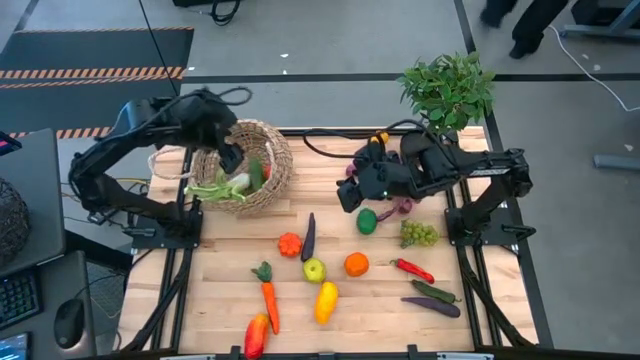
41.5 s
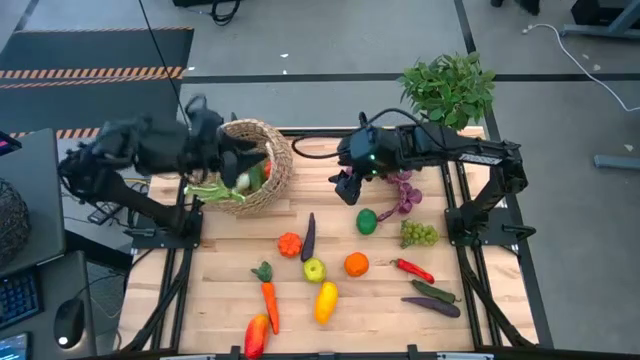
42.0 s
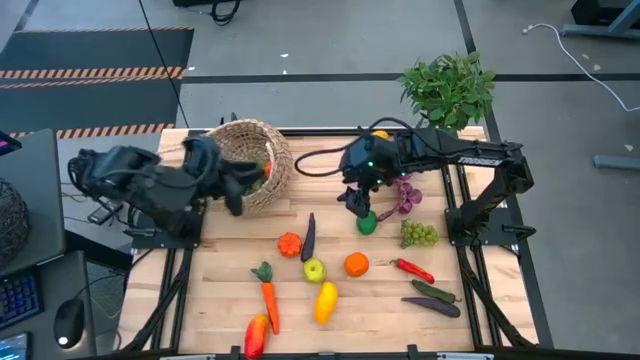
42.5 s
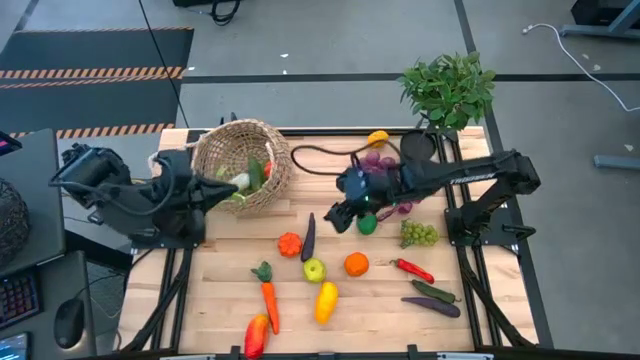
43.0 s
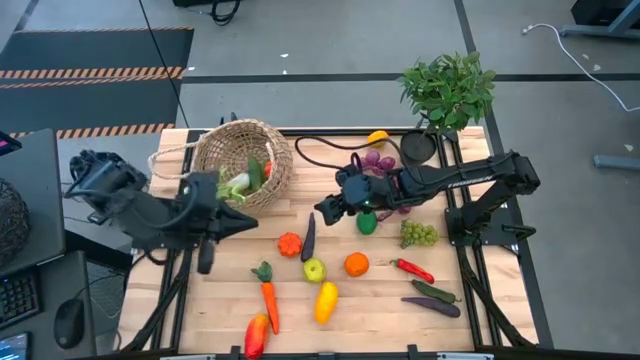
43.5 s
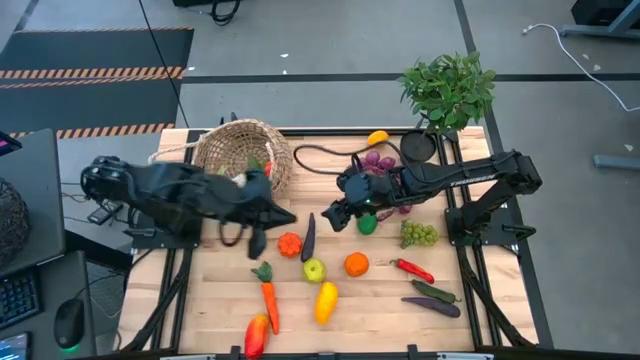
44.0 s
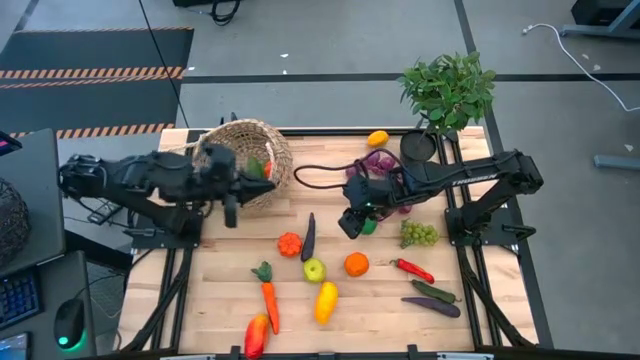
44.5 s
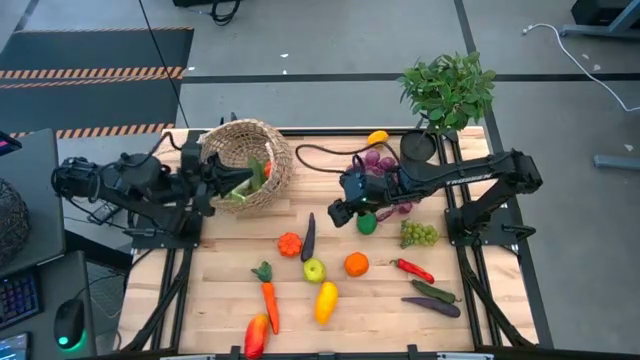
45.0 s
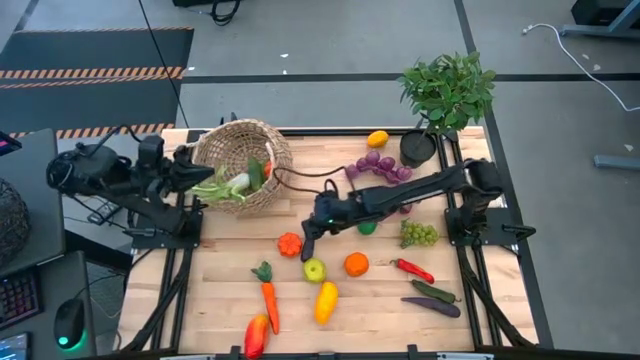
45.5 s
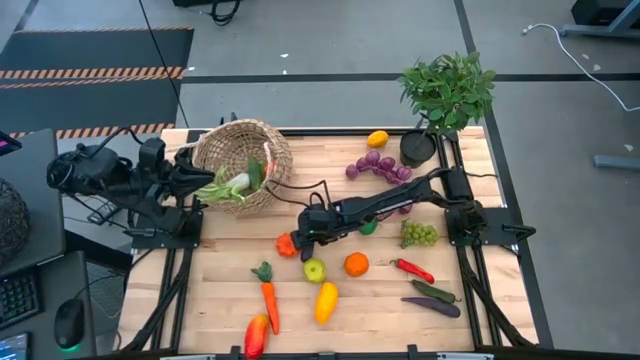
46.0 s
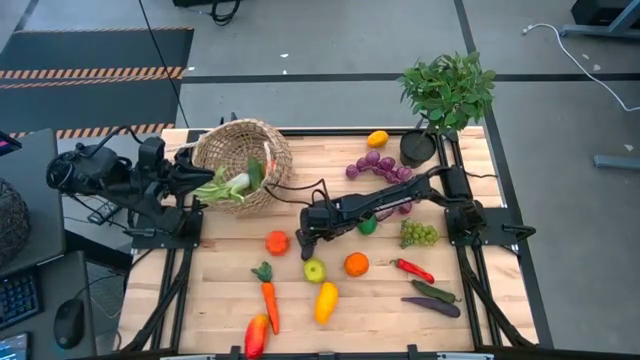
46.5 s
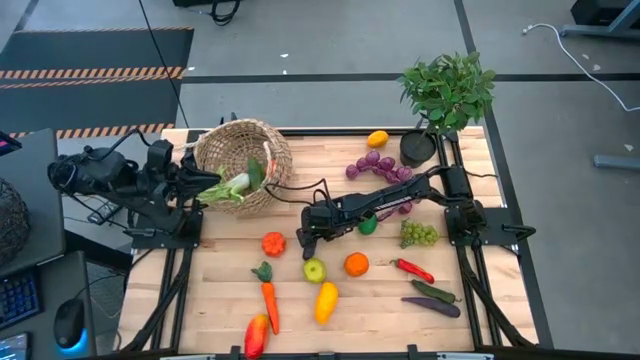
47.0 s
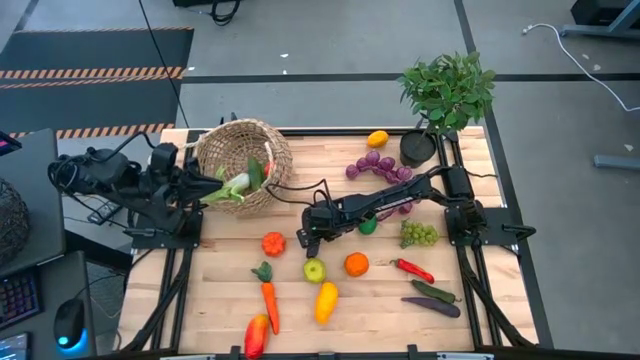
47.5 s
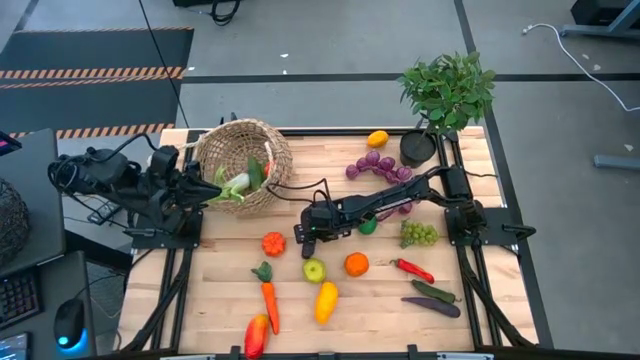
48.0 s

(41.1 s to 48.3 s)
Task: Build produce basket
Put the top violet eggplant into the brown basket

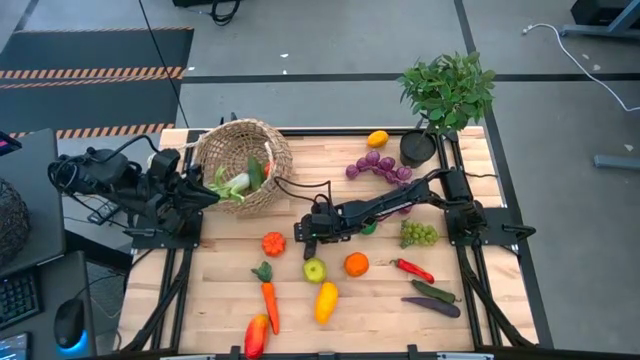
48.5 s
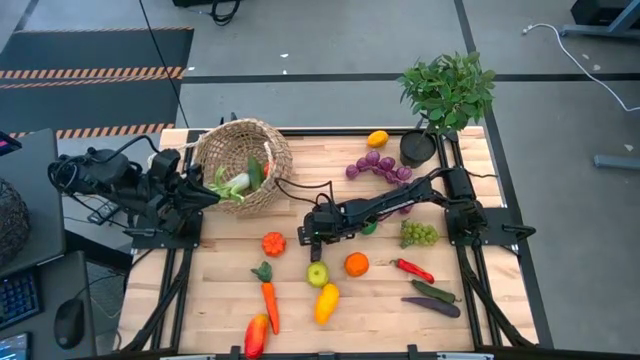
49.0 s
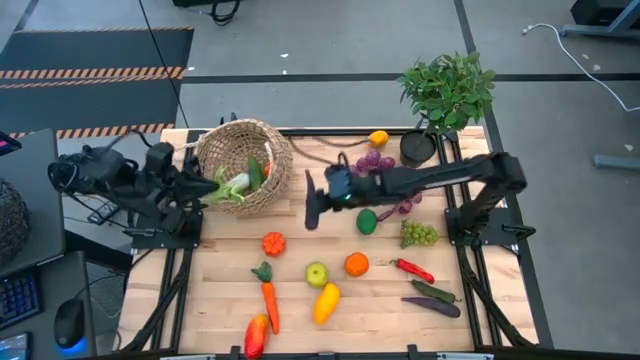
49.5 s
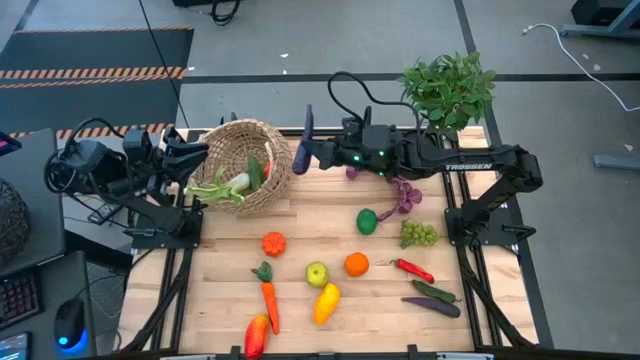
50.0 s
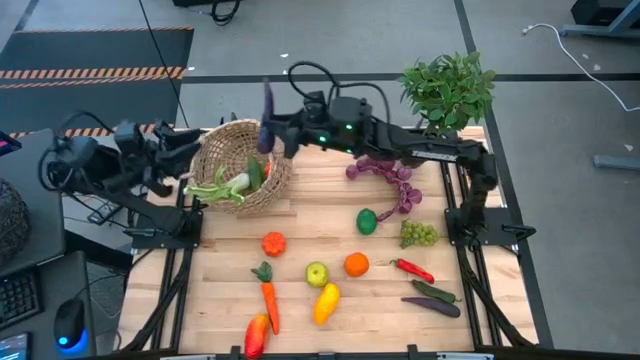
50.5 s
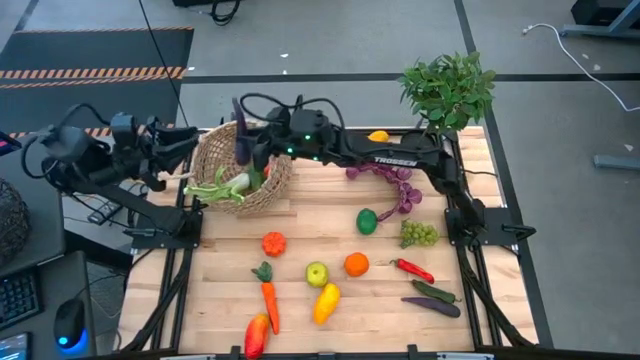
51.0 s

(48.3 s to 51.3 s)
Put the top violet eggplant into the brown basket

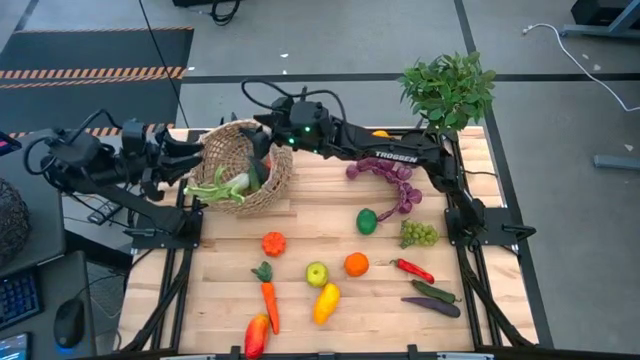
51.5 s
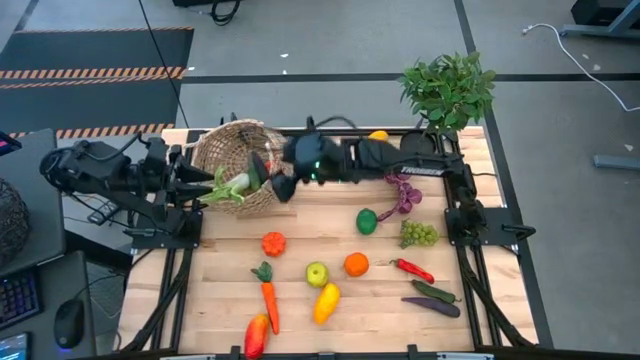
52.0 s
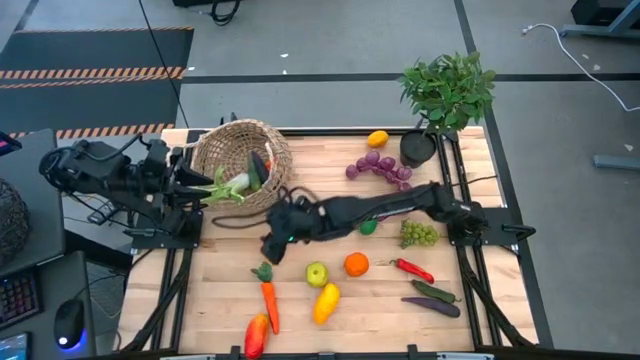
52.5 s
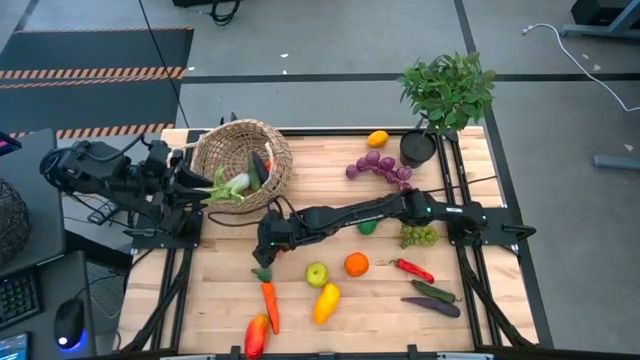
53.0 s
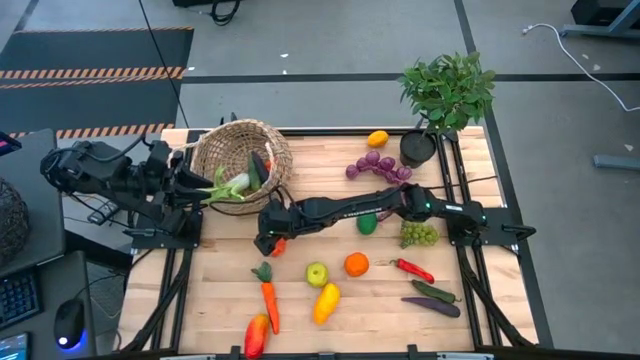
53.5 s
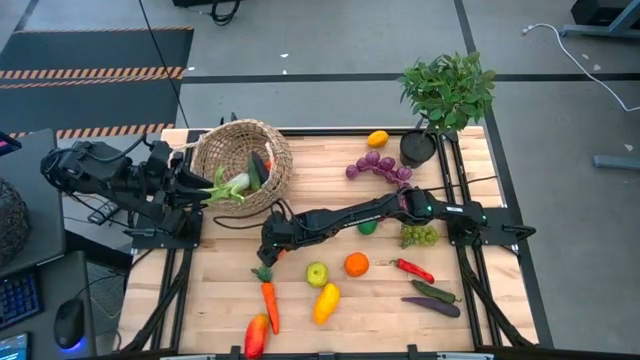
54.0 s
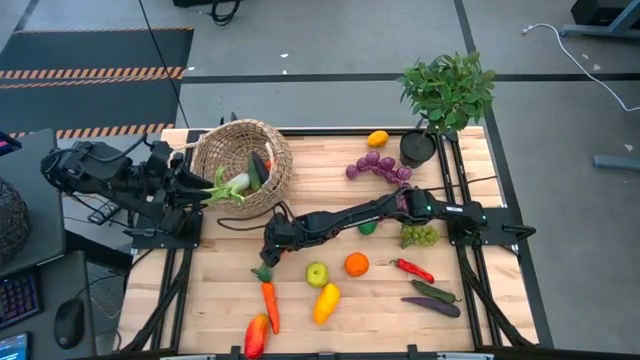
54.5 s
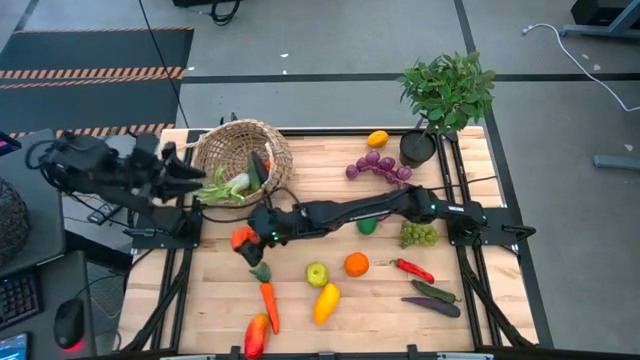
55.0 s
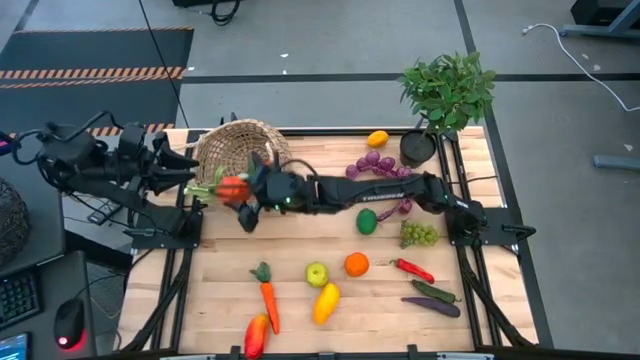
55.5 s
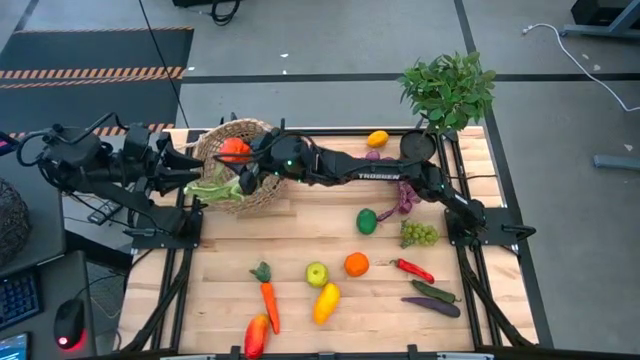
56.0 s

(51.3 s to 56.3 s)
Put the orange pumpkin into the brown basket

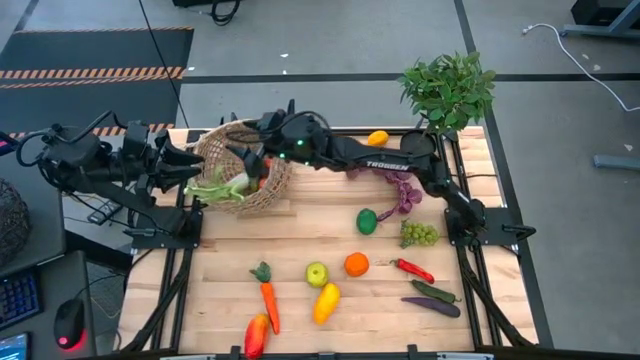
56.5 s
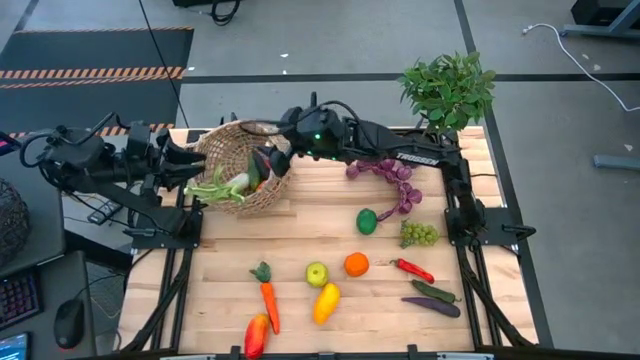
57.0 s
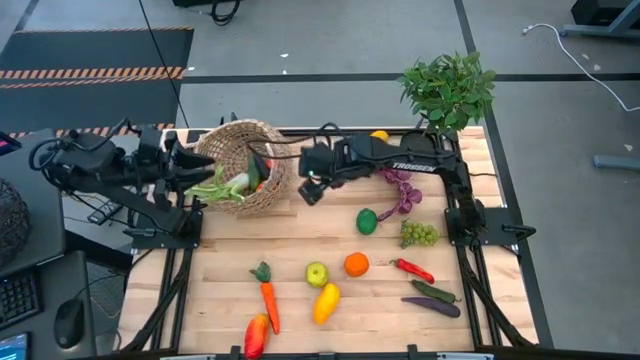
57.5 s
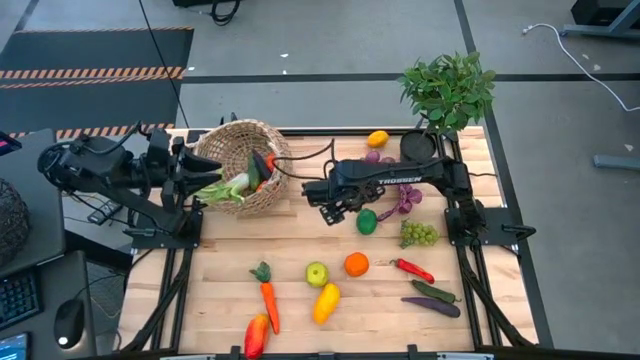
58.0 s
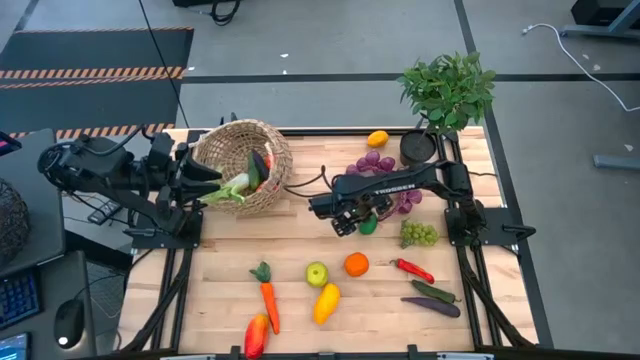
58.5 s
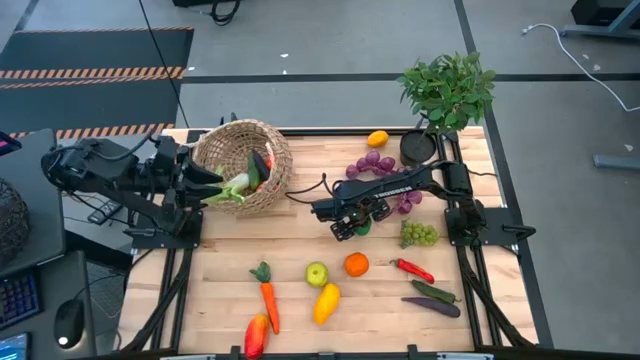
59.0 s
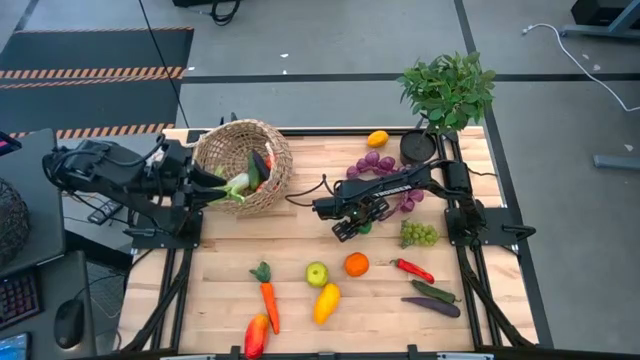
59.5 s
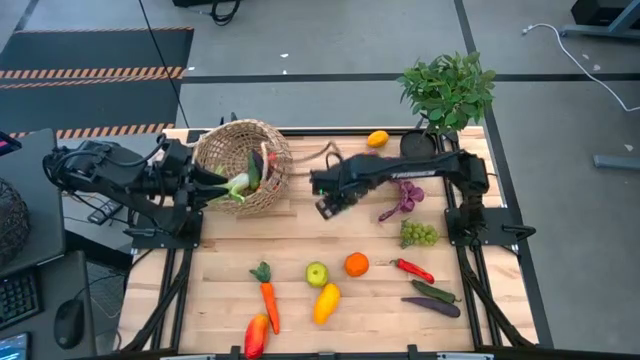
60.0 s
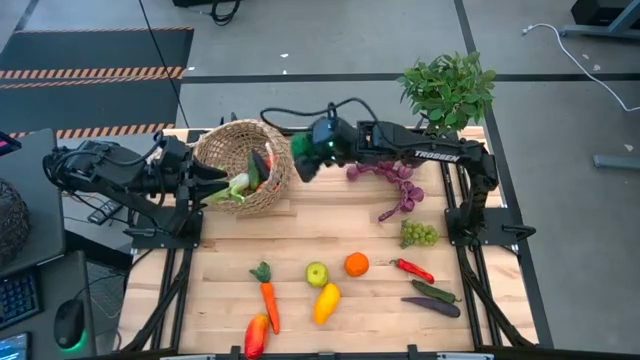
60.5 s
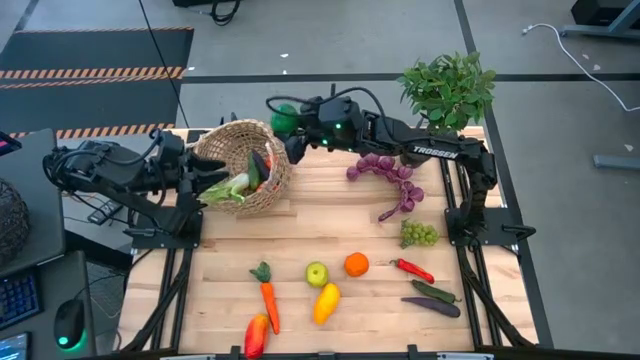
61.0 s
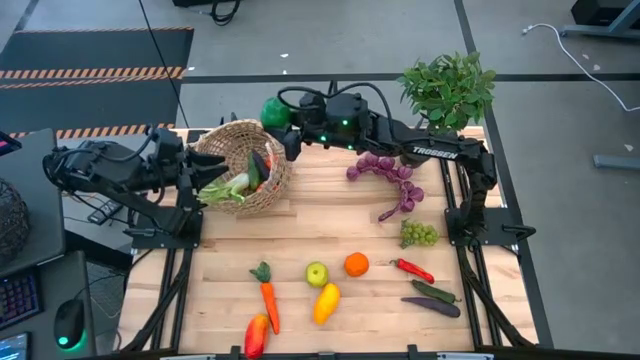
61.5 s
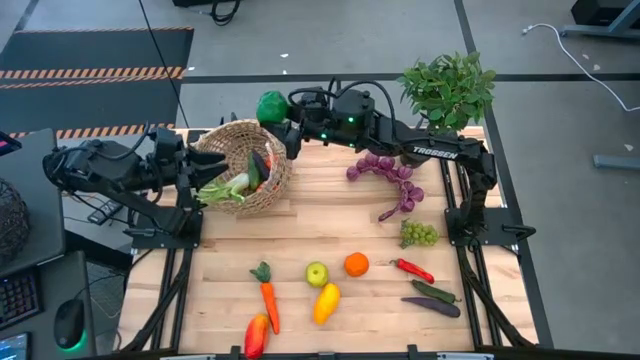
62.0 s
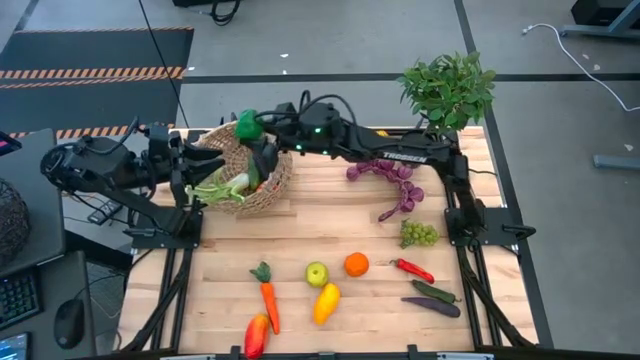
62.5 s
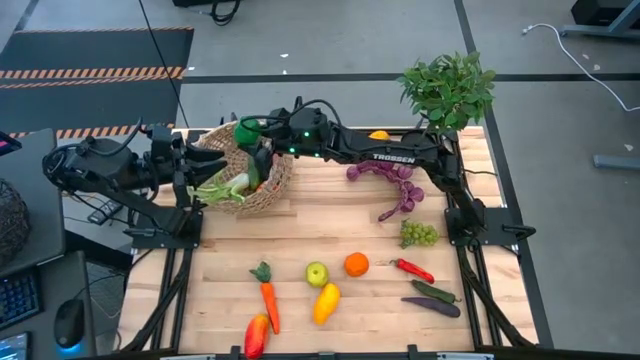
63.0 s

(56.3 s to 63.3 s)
Put the green lime into the brown basket
